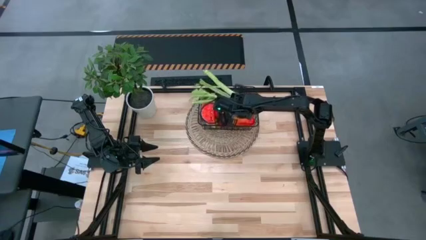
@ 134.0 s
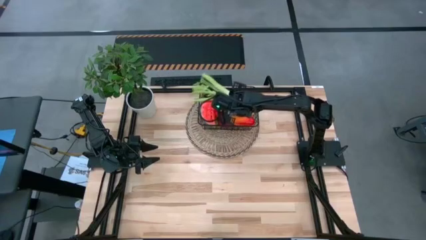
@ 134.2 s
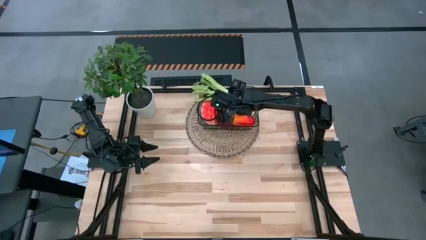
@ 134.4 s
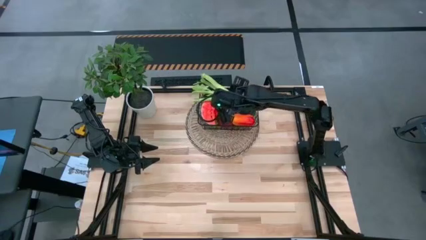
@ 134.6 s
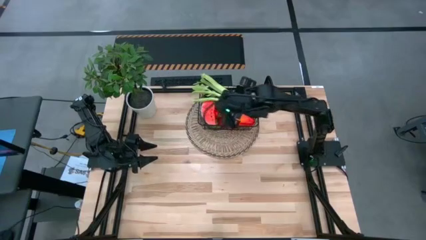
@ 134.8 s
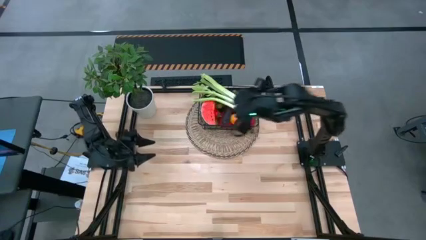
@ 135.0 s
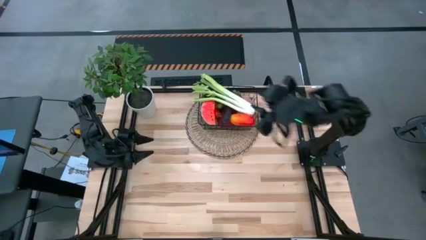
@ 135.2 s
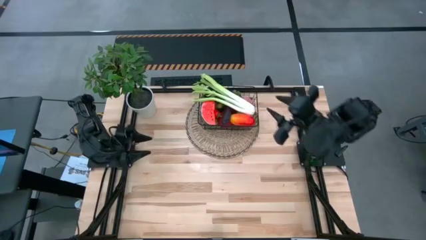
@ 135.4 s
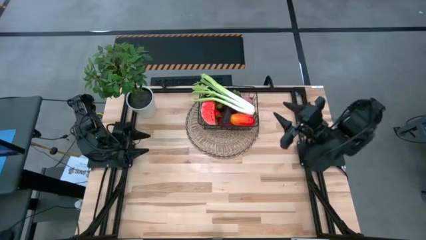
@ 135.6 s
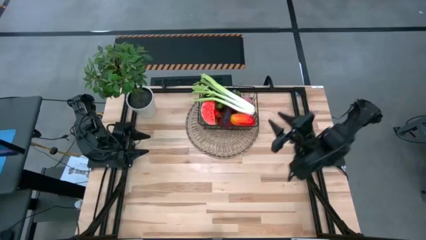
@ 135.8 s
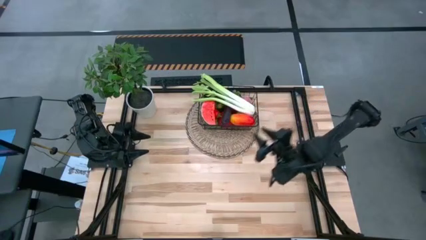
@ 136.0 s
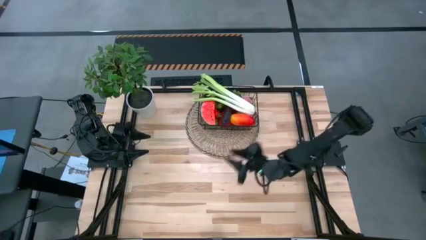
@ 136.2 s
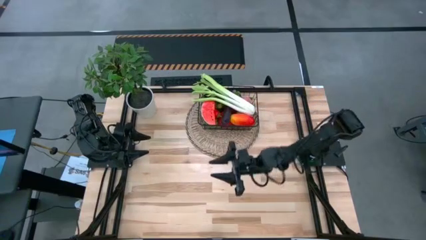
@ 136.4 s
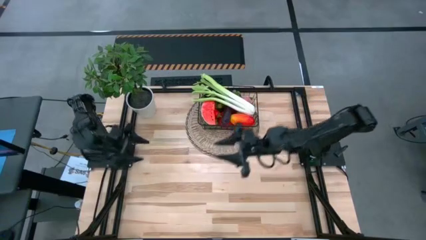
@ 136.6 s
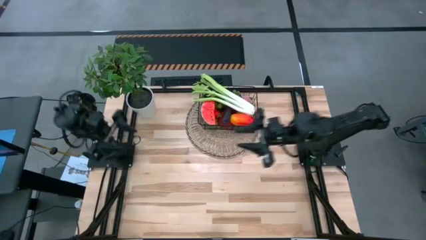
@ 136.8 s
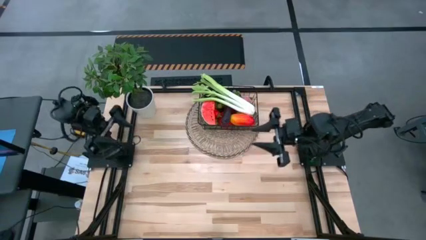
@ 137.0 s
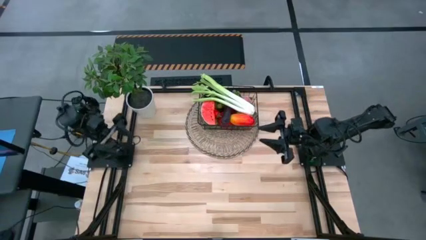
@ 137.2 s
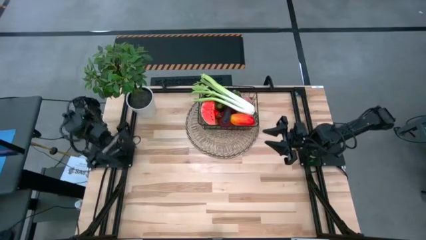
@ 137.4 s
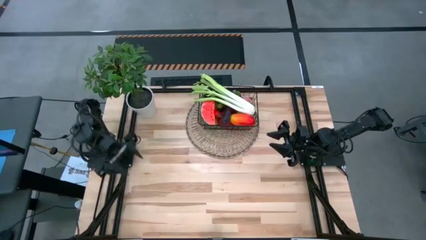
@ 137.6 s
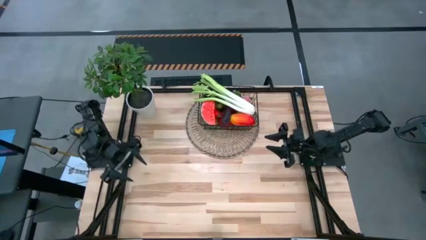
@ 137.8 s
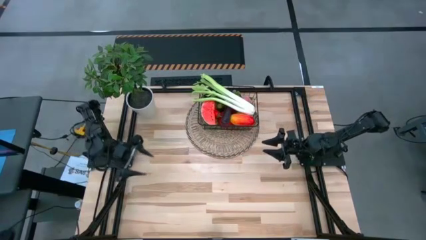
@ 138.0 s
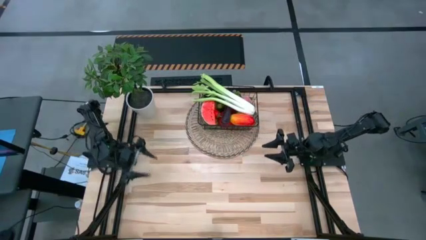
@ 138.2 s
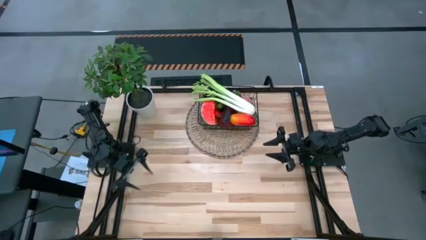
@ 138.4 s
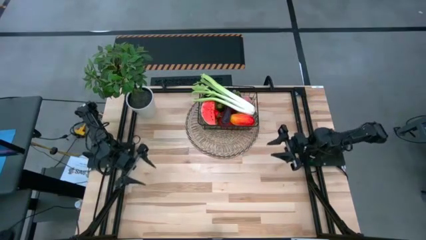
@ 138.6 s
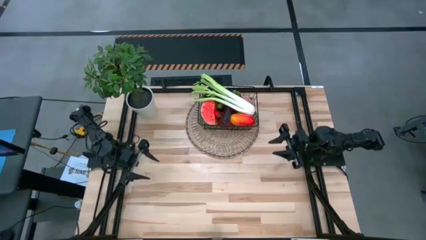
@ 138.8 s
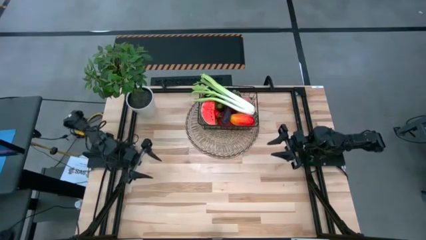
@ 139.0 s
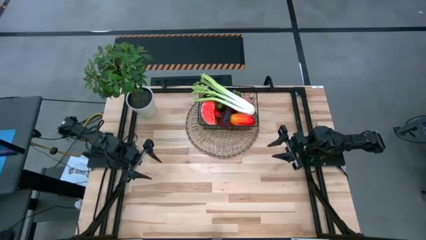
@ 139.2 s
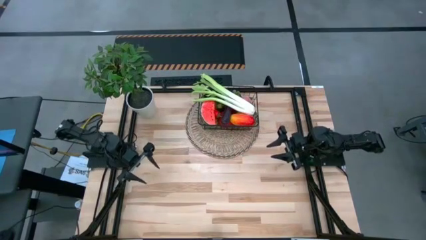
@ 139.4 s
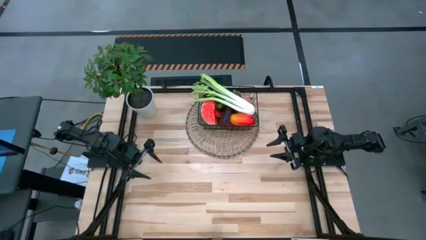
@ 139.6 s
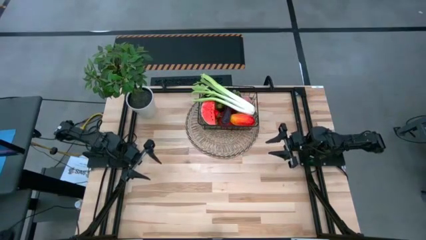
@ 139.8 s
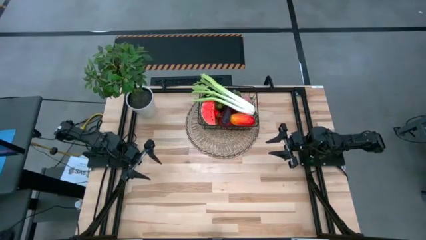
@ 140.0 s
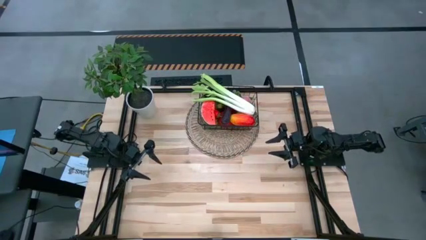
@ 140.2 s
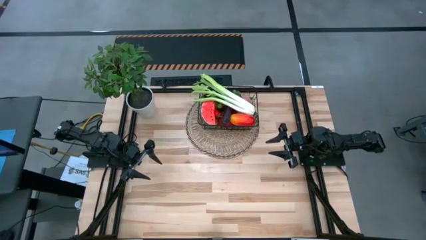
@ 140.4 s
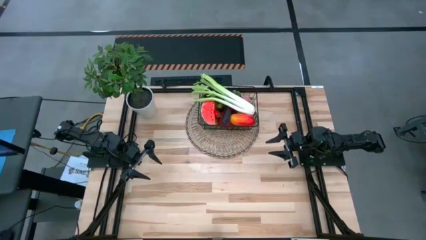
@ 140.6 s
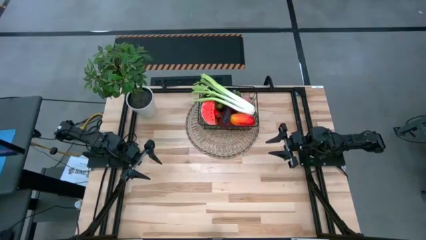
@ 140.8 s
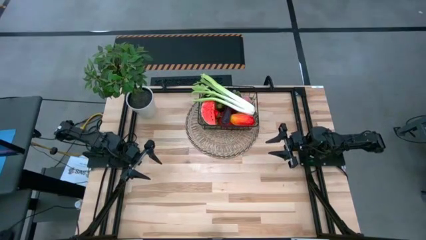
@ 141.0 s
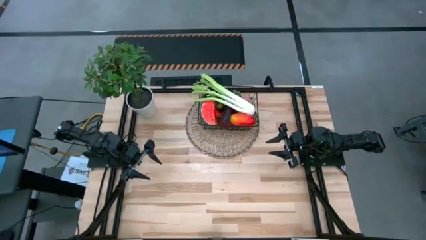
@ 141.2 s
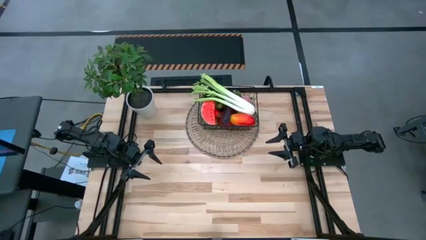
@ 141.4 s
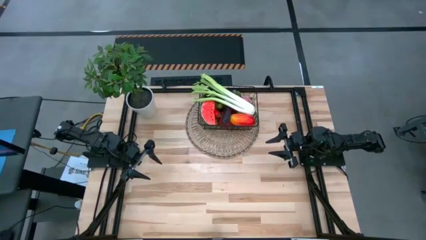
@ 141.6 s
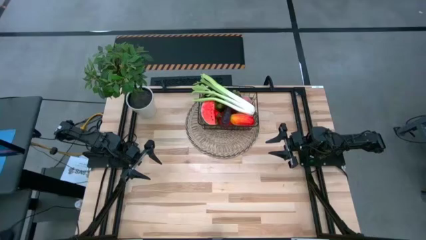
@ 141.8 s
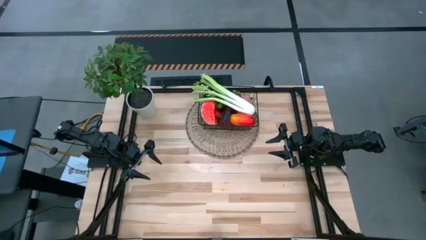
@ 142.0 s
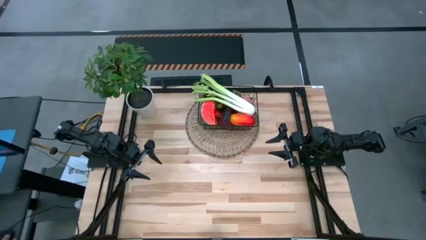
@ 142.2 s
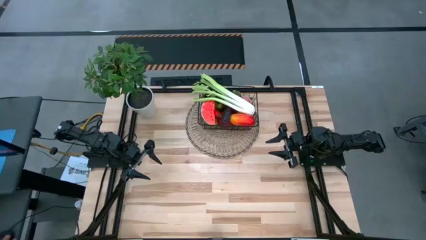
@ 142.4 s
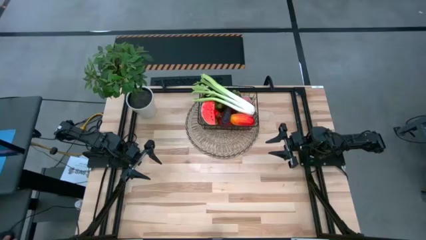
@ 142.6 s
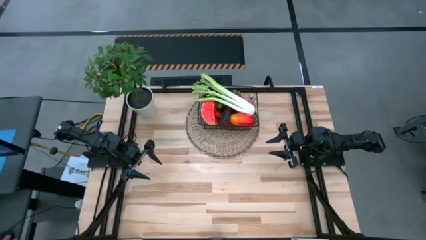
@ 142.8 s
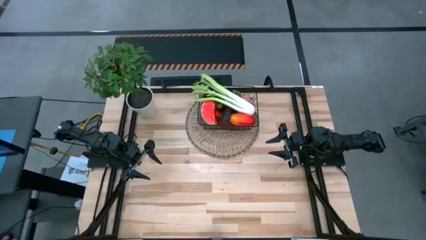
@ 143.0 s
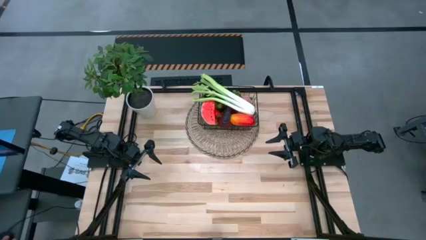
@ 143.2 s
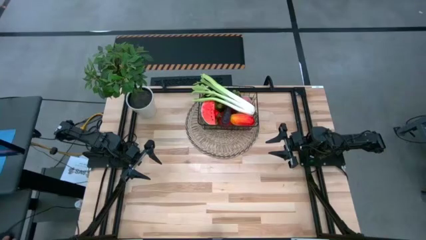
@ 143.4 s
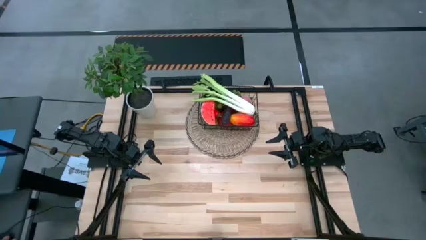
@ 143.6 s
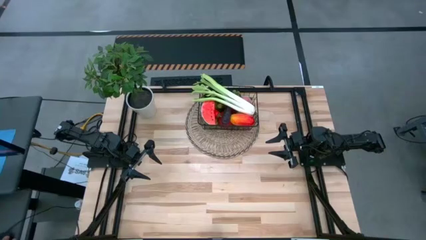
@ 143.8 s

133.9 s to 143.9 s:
Task: Build produce basket
Return to Home Position
